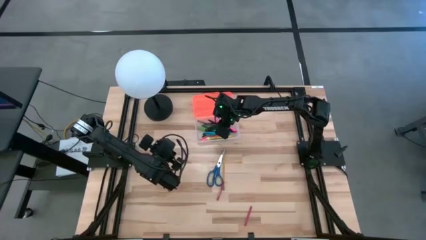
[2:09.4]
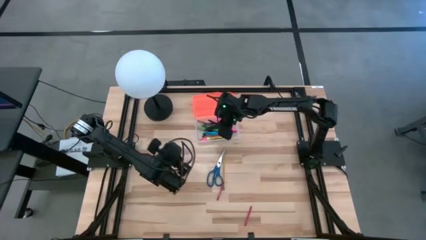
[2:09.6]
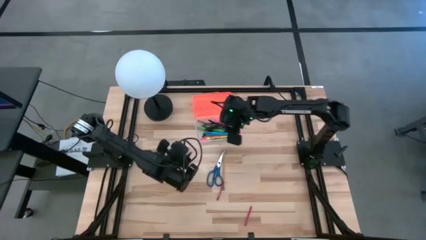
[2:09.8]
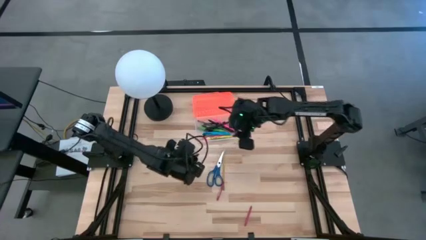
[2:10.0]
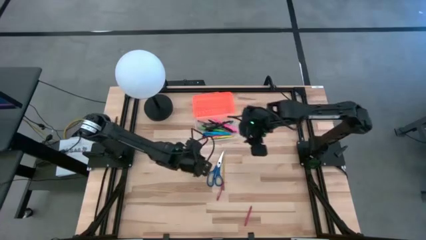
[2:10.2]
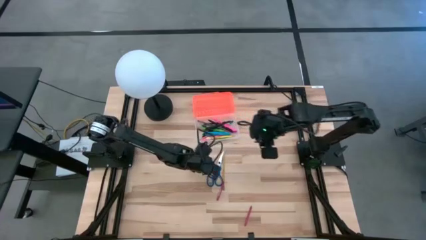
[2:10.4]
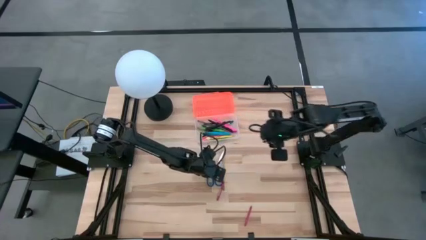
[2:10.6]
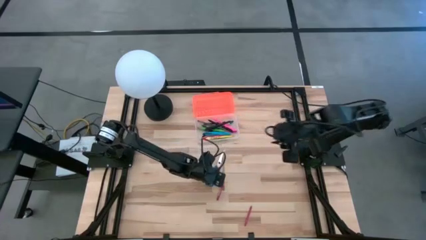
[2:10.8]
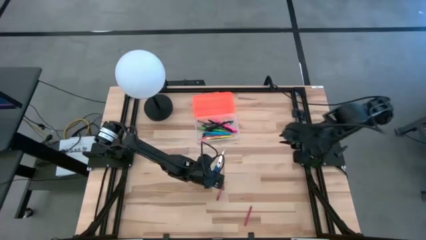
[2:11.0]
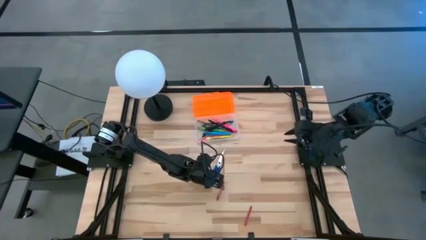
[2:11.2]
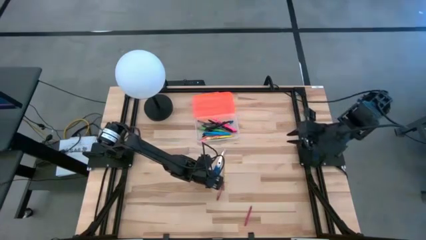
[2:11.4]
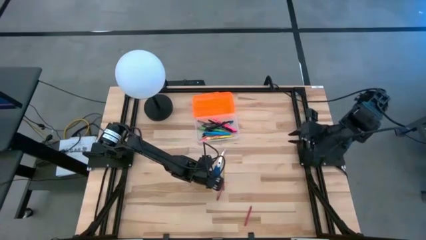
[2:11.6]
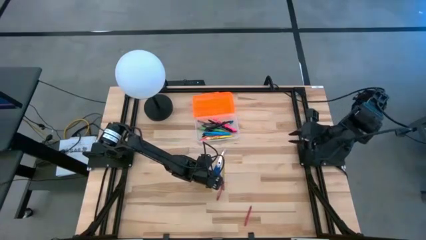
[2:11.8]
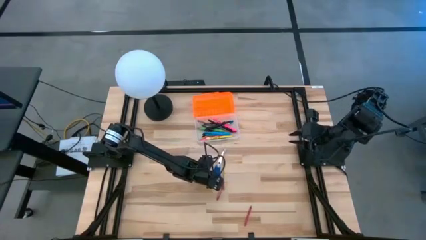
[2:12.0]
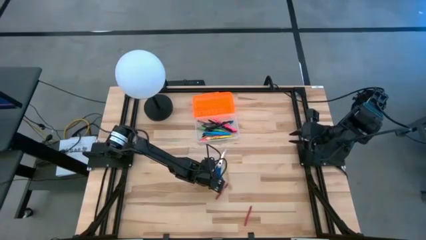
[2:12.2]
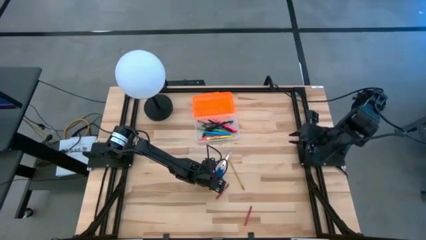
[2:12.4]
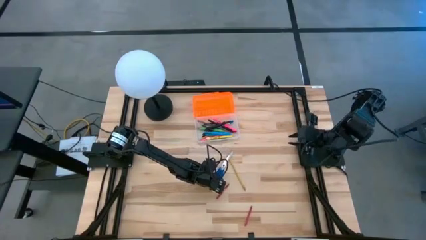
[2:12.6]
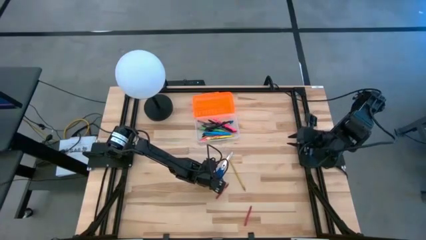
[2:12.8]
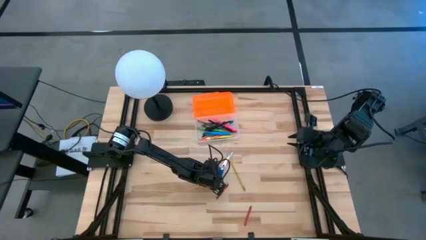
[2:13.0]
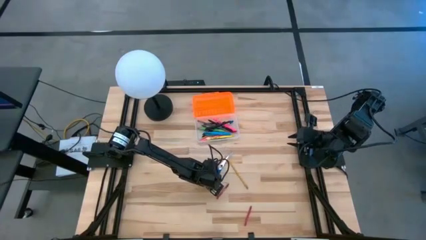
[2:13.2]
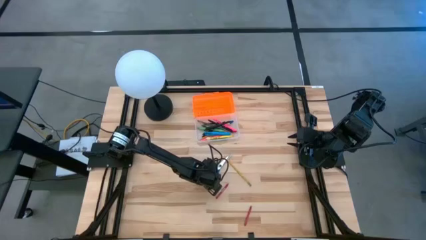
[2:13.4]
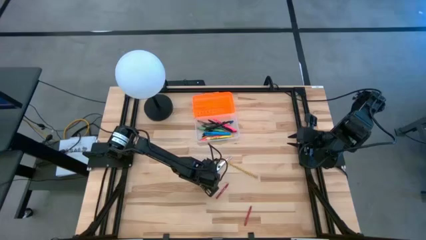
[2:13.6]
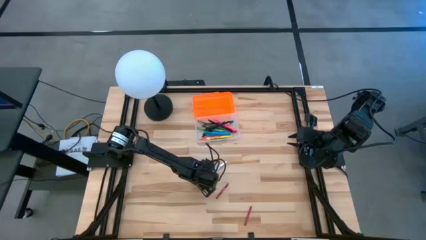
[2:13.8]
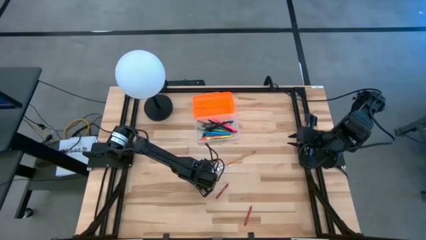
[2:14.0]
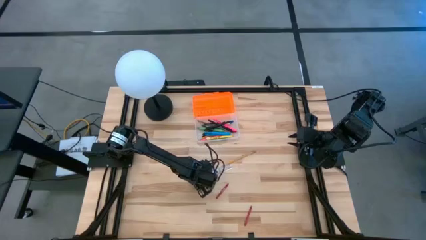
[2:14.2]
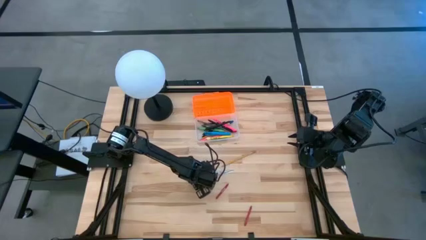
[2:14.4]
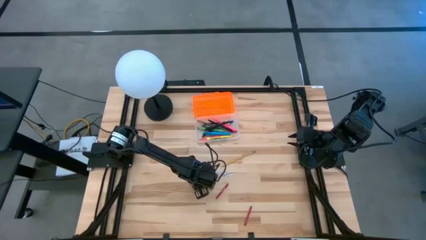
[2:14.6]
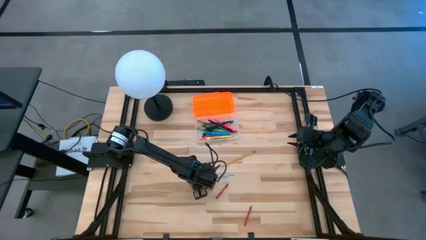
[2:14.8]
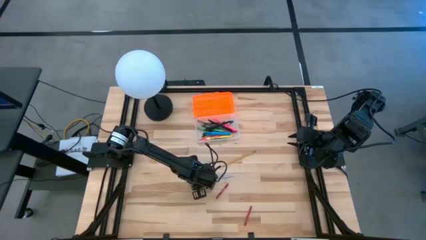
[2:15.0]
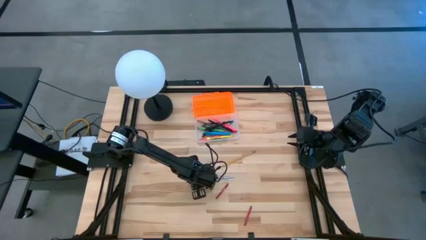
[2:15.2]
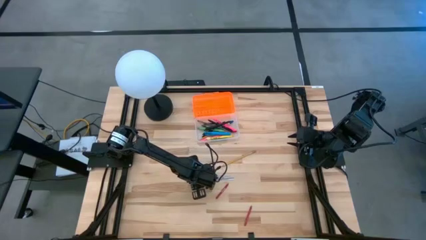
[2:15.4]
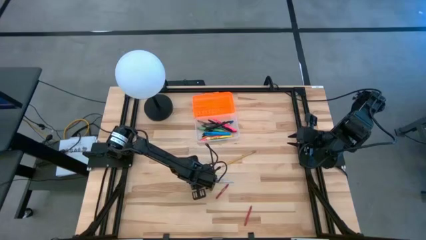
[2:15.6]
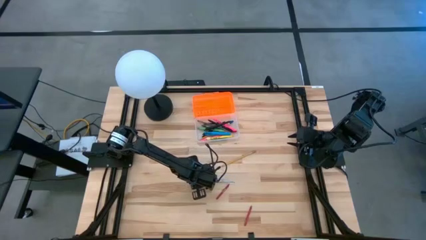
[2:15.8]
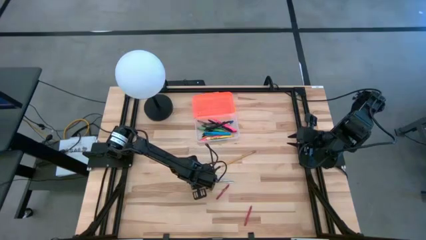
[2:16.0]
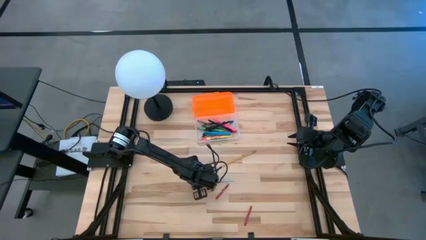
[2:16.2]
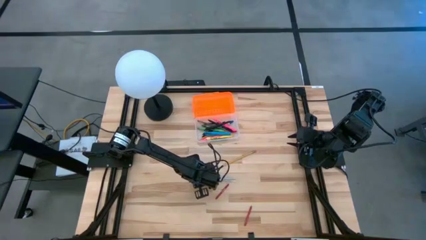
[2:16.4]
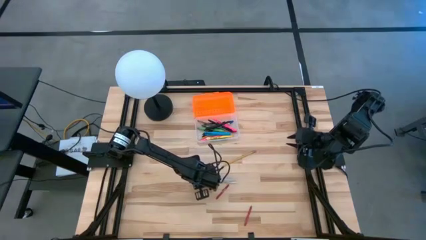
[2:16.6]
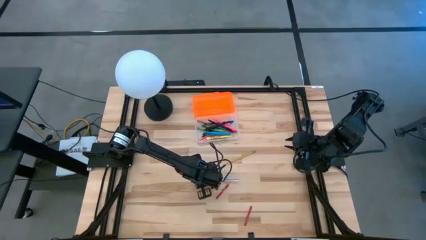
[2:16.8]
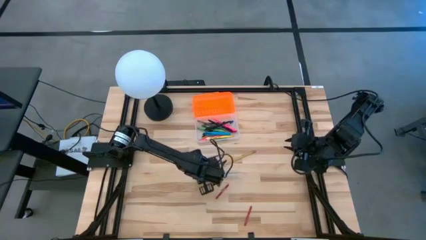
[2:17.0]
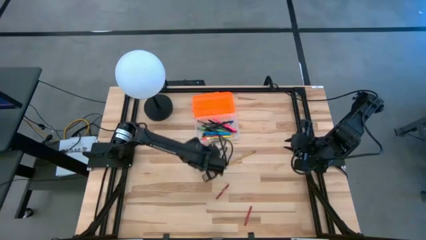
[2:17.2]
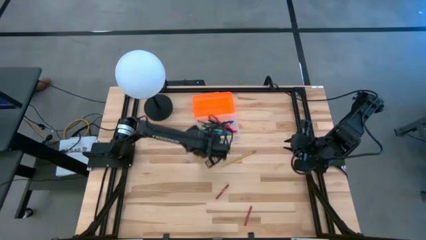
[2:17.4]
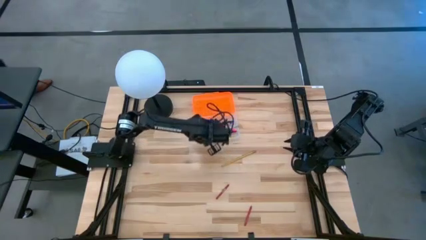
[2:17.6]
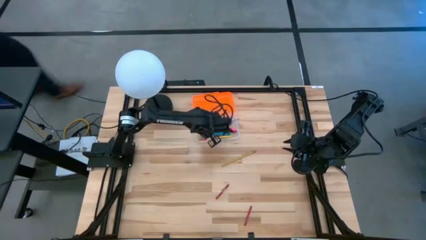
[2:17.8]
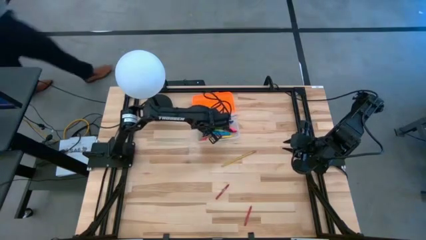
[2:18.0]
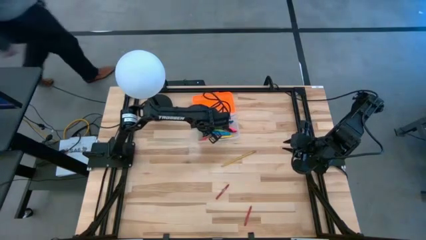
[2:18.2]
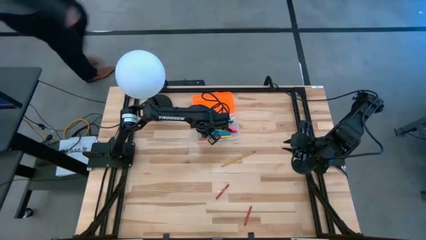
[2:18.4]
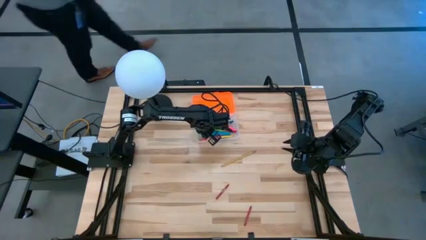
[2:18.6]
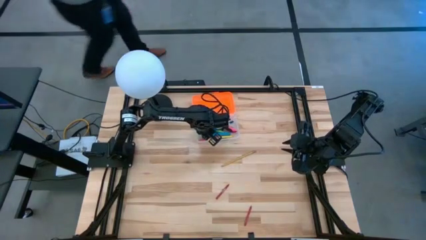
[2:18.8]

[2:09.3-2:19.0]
Task: Pick & place school supplies into a supply box
Put the blue scissor into the supply box
